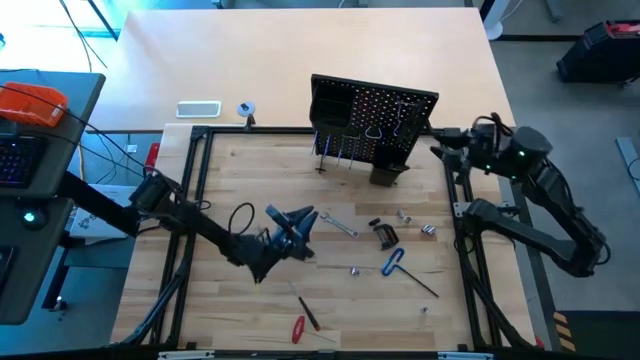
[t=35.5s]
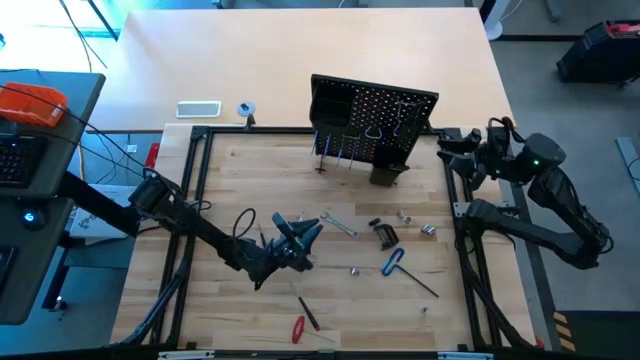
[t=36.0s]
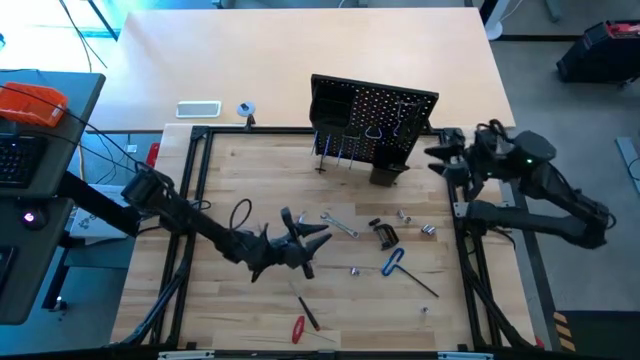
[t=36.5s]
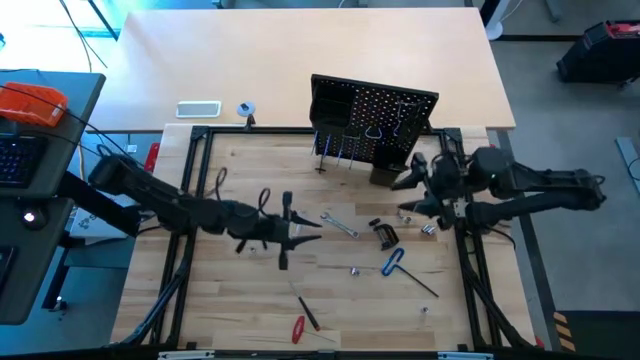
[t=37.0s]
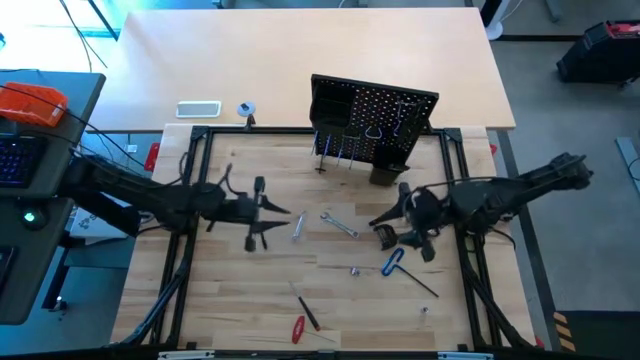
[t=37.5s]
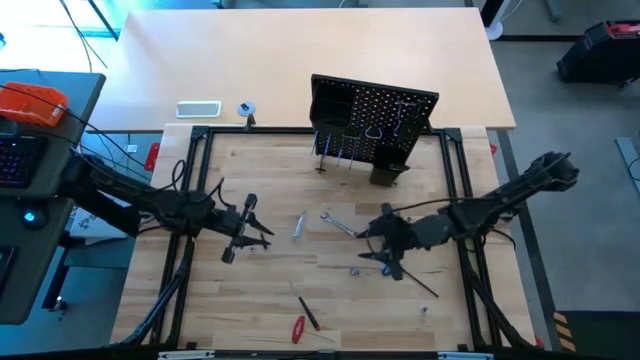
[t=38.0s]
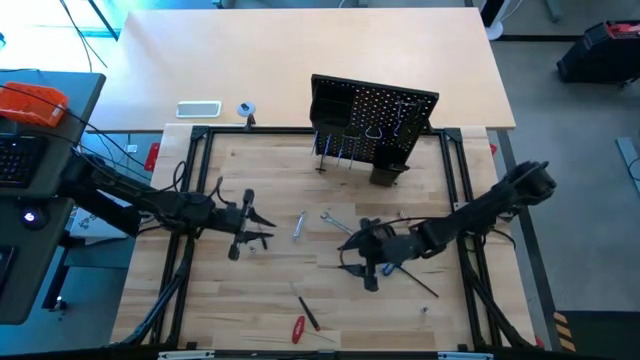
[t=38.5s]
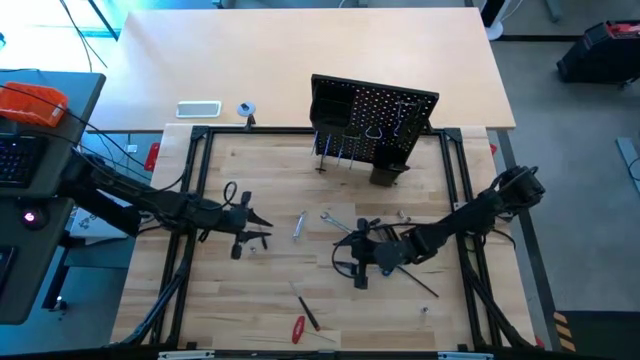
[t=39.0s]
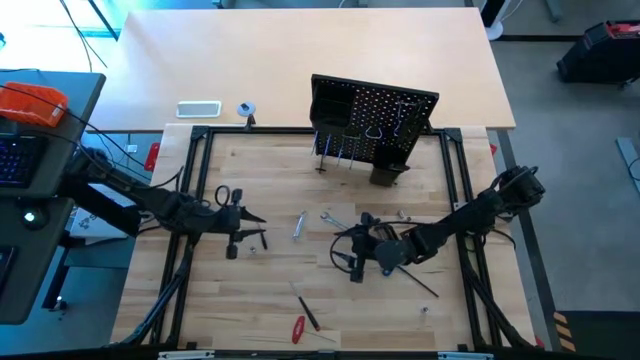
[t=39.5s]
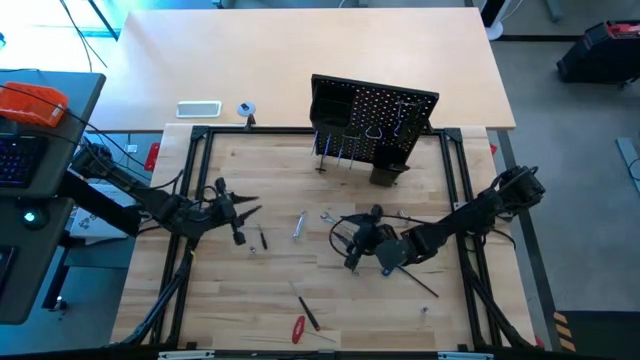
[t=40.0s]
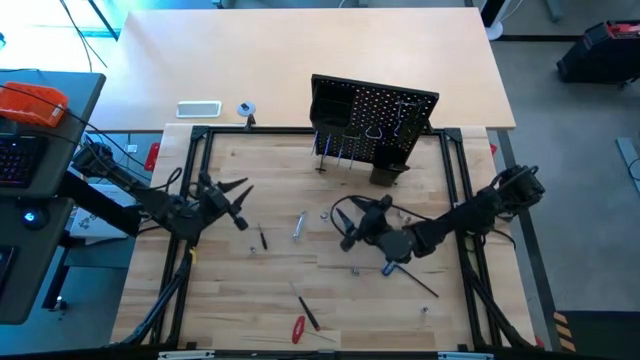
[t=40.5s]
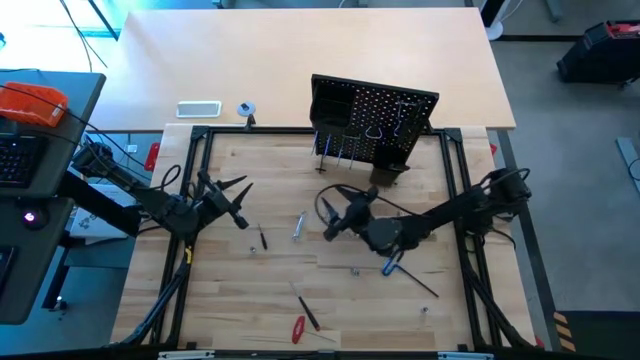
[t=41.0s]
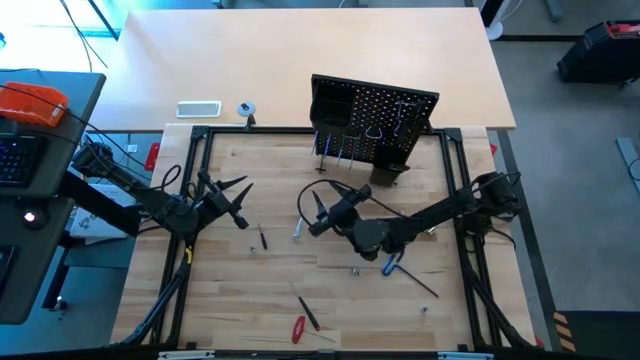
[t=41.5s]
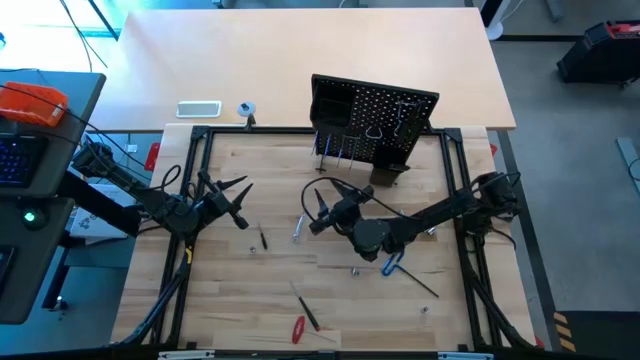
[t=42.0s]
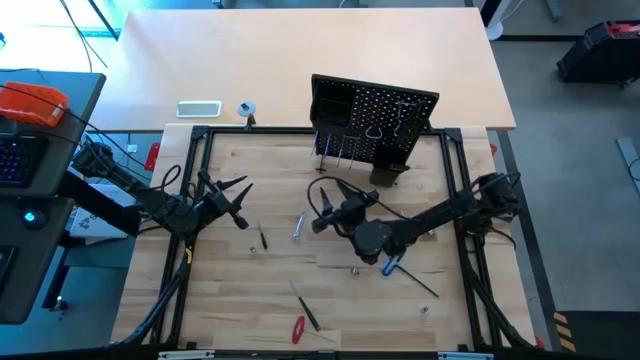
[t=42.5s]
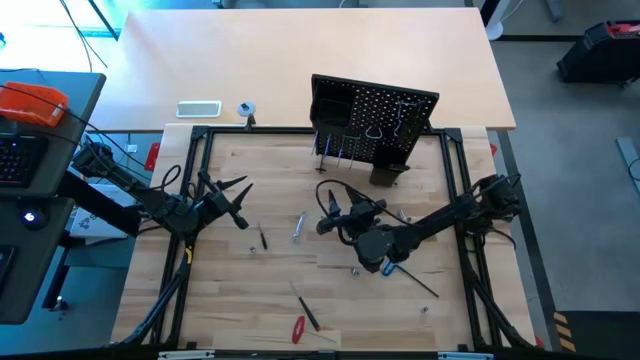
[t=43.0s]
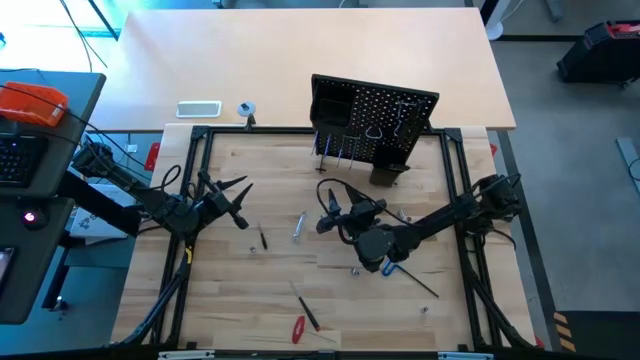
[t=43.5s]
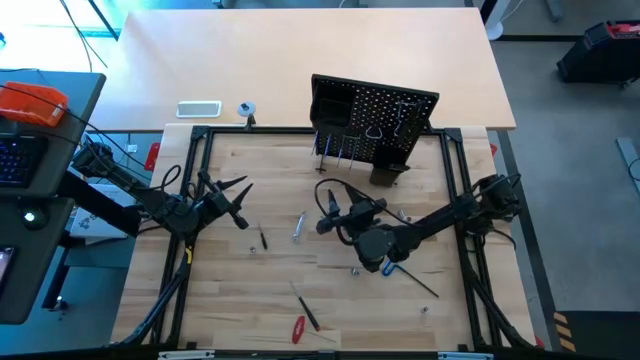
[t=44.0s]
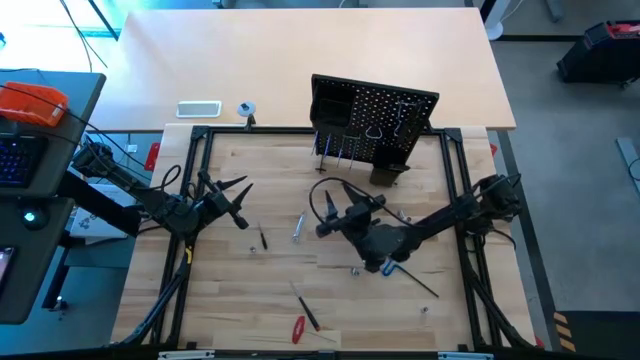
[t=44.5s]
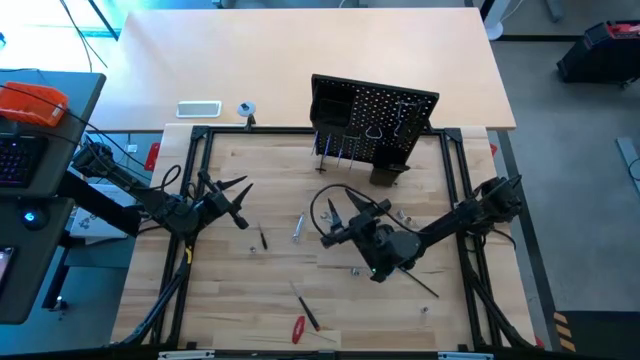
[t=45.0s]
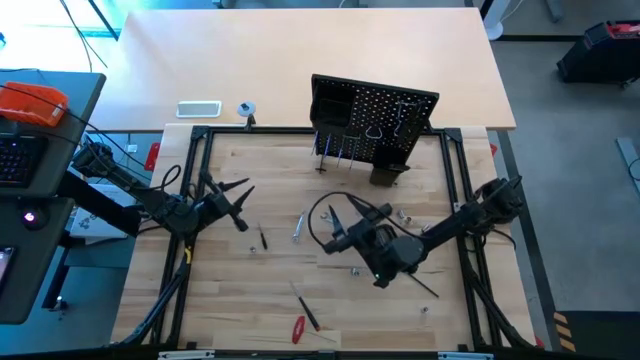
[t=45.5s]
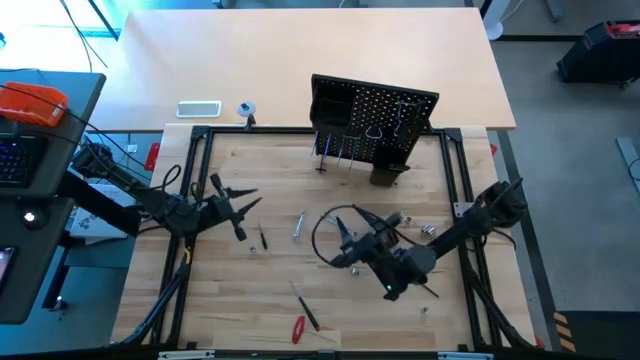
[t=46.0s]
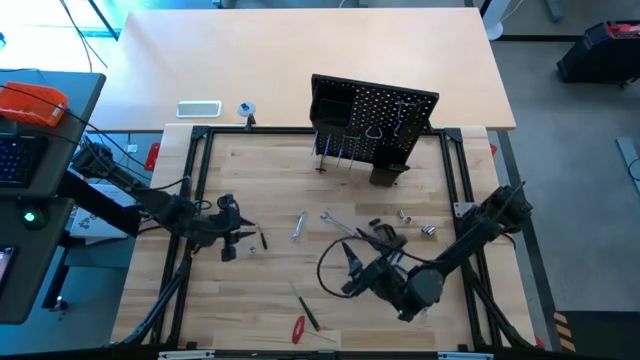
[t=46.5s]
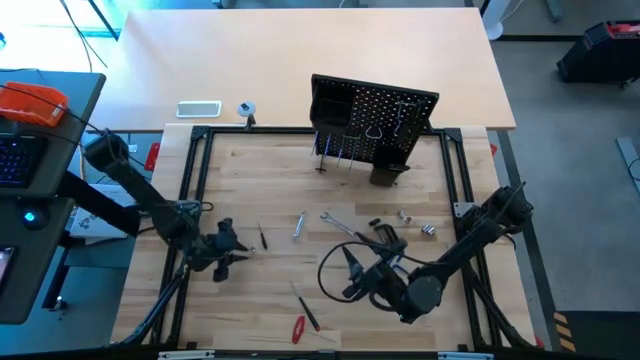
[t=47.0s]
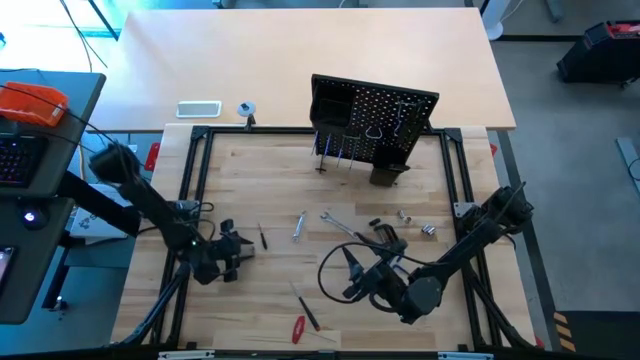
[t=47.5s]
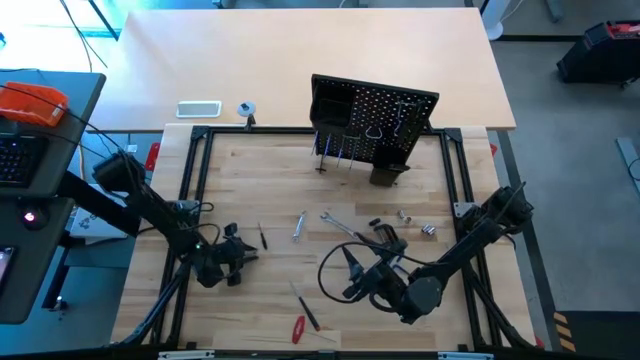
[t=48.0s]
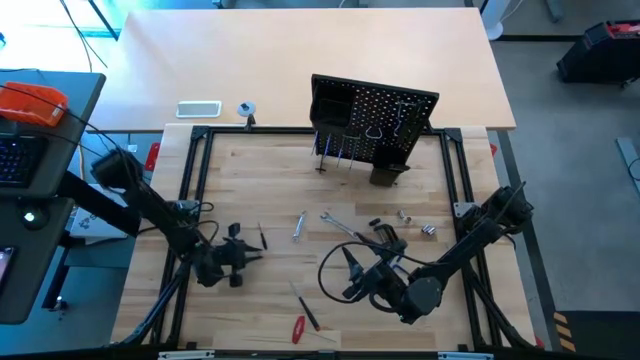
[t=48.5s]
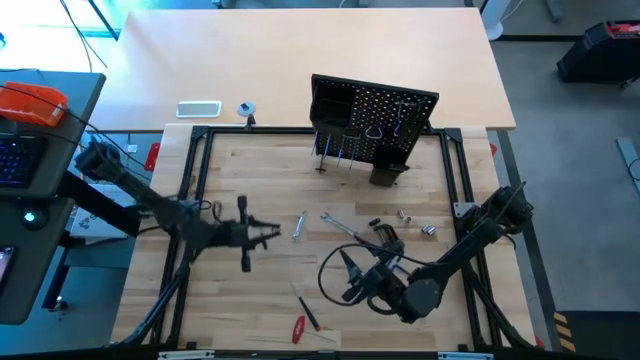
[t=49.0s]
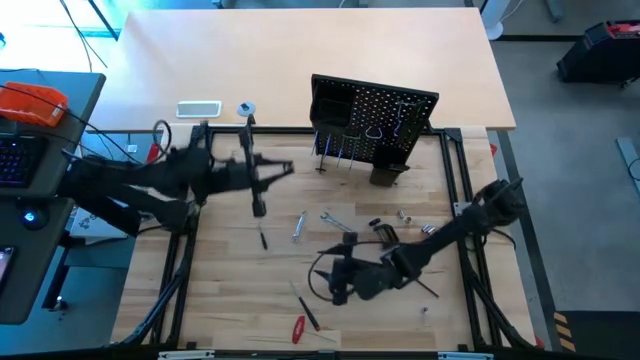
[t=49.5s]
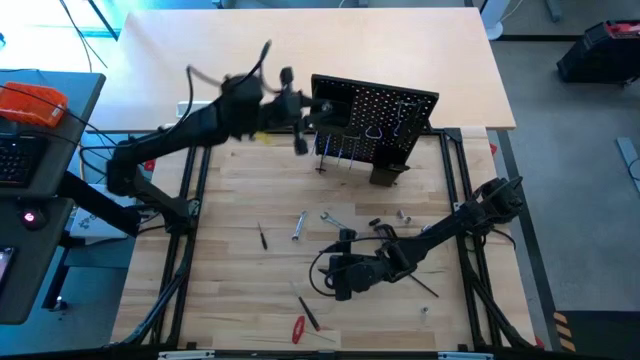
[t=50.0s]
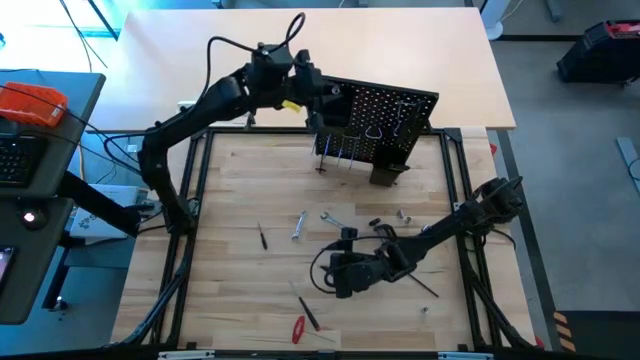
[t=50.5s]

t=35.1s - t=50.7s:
Task: Hang tools onto peg board
Hang the silver socket onto the pegboard

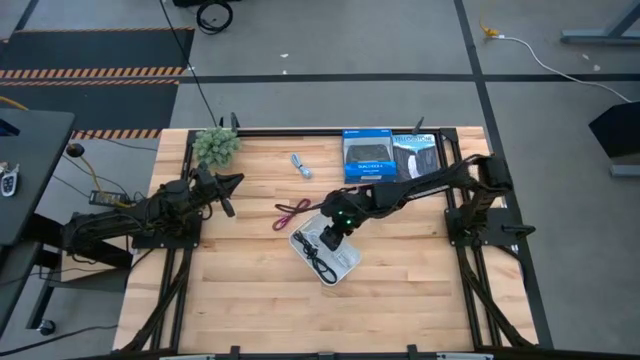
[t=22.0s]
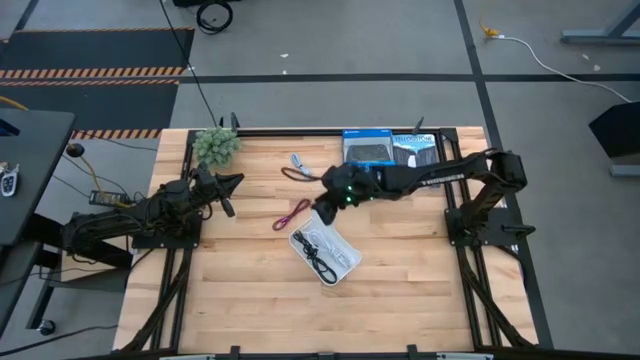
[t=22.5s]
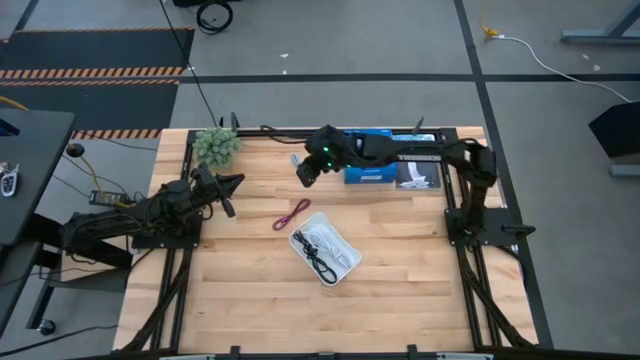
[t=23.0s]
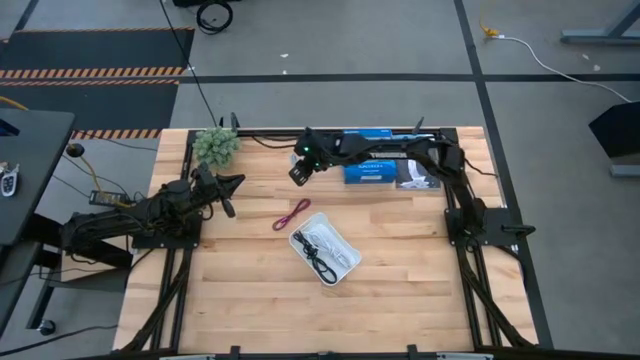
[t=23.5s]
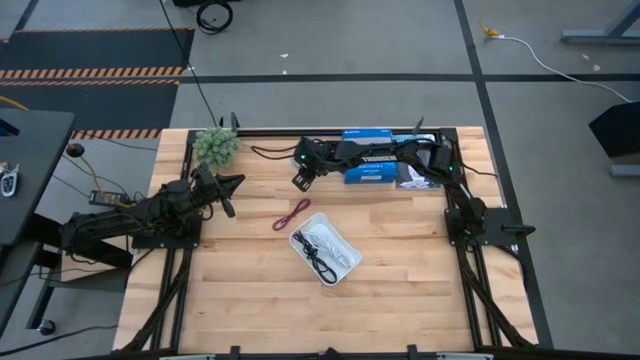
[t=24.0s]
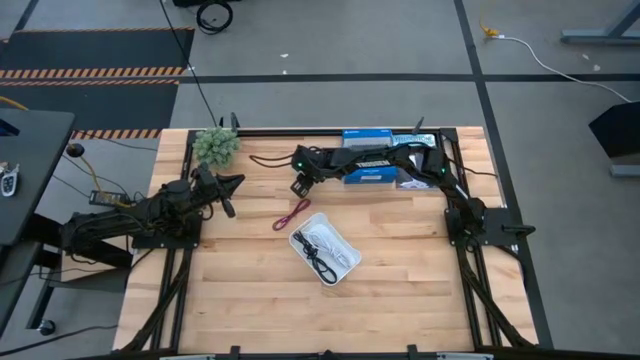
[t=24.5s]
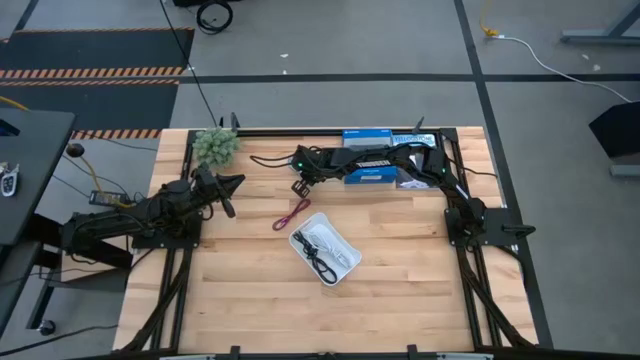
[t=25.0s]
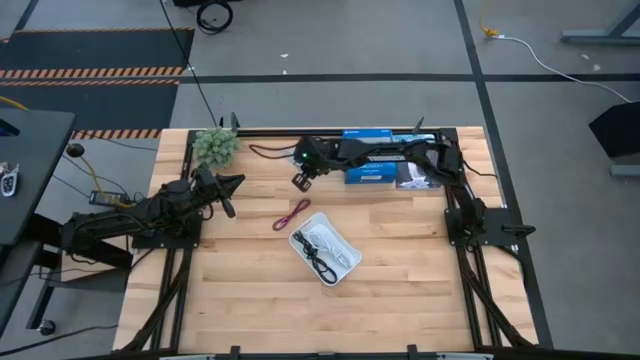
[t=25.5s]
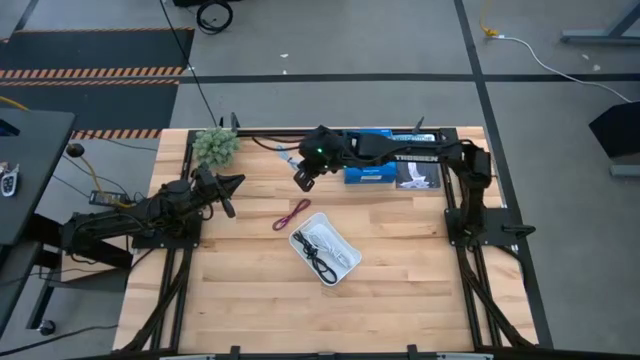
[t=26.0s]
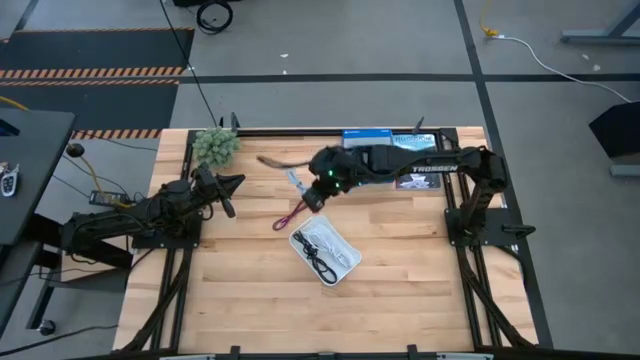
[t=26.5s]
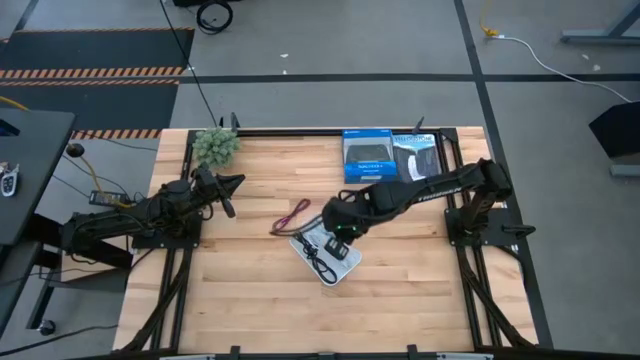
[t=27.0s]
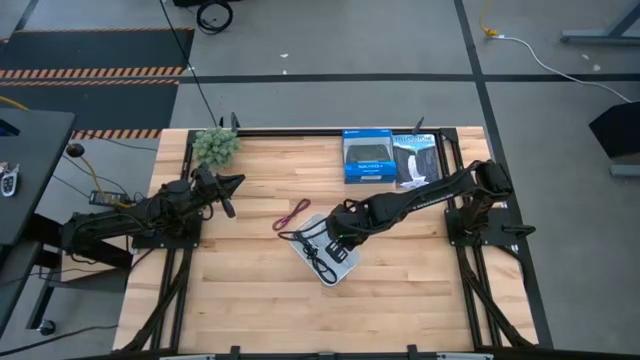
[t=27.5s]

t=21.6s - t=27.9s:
Task: Pick and place USB-C Cables
Put the light blue charger cable into the white bin
